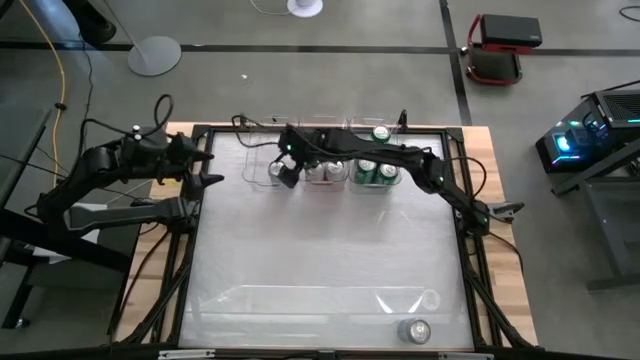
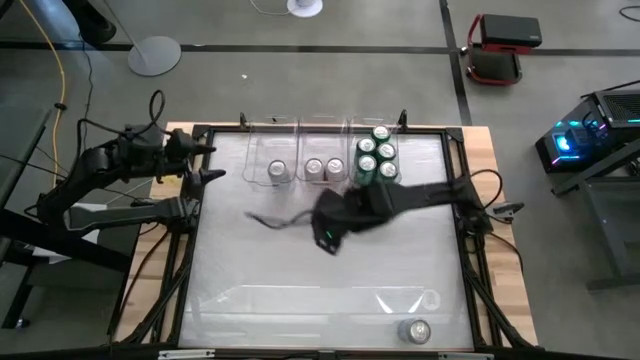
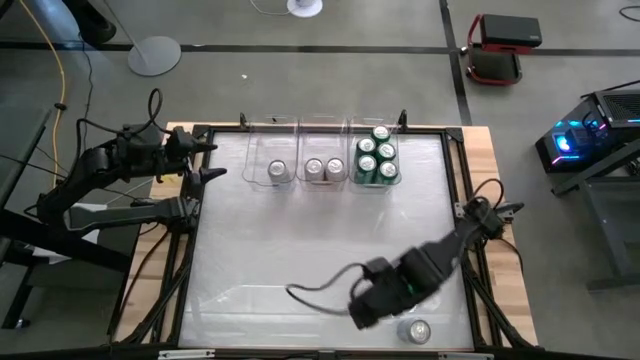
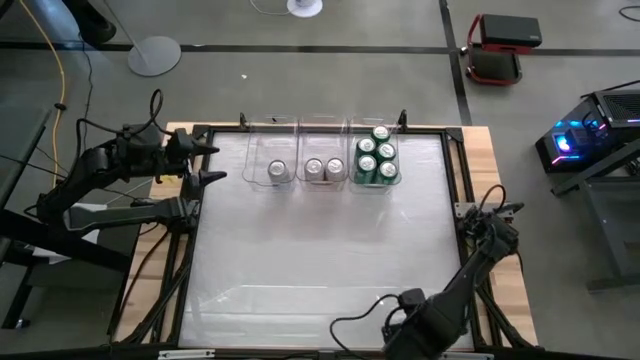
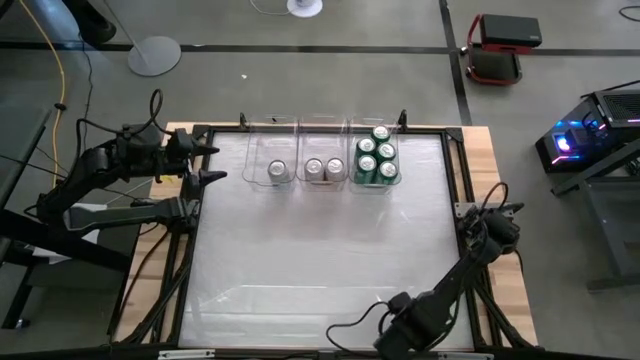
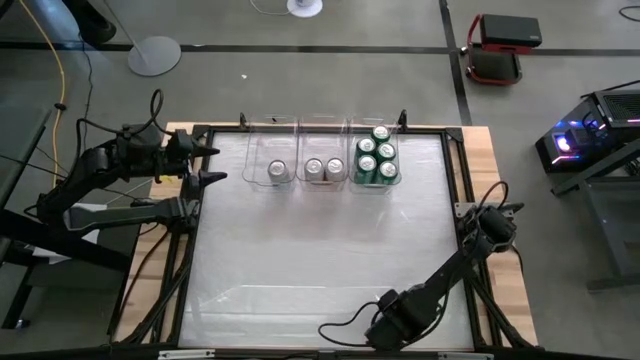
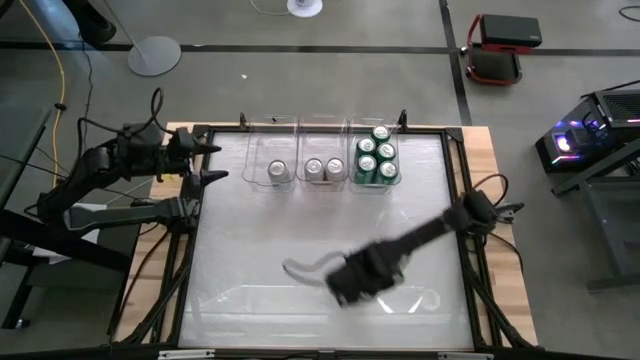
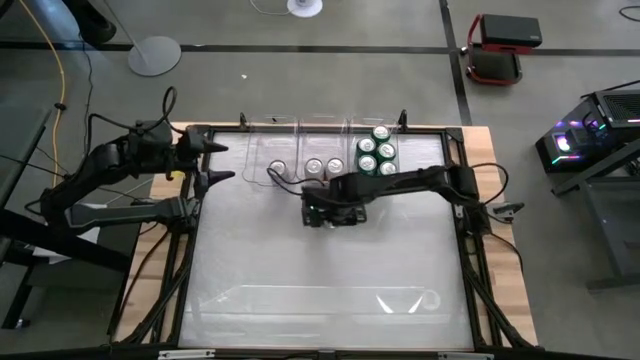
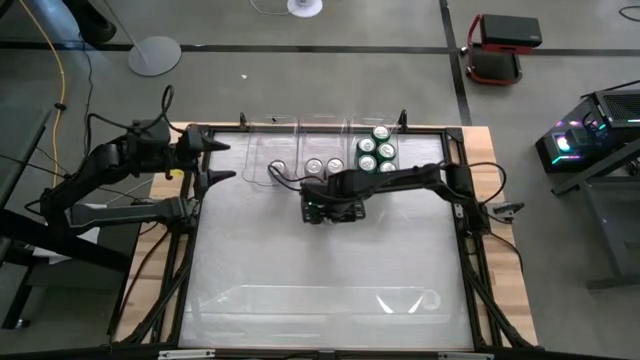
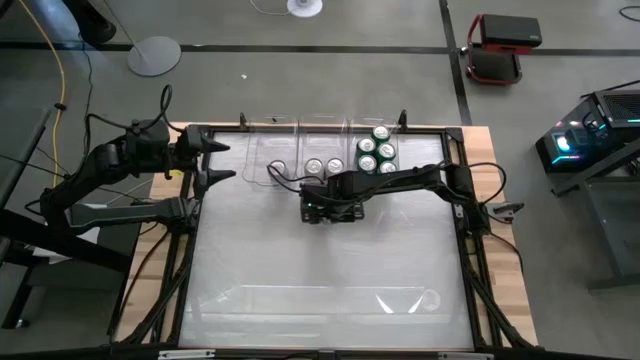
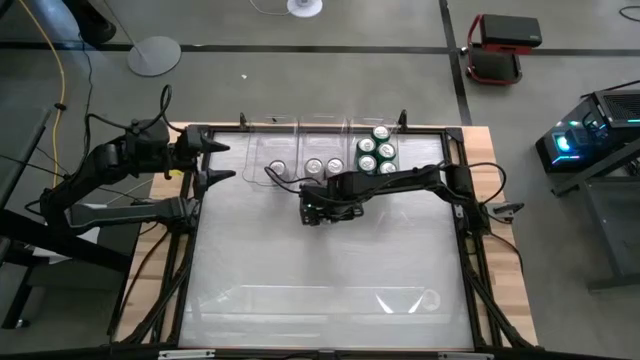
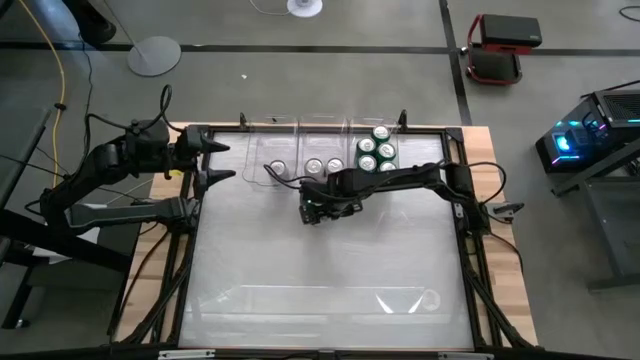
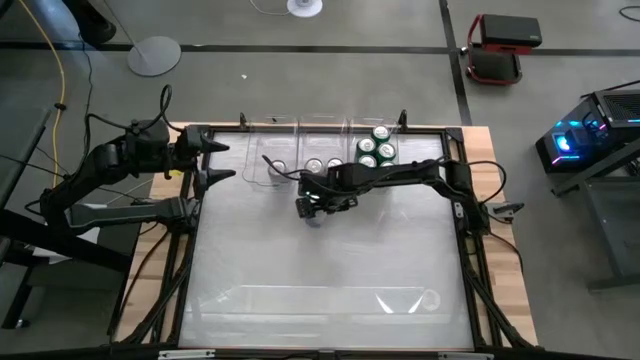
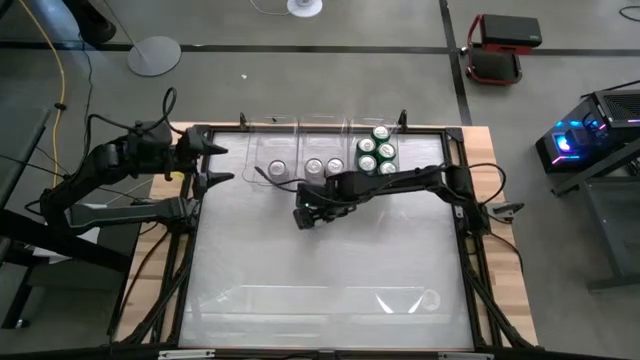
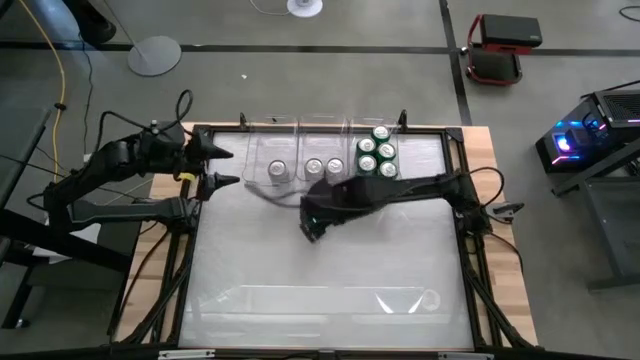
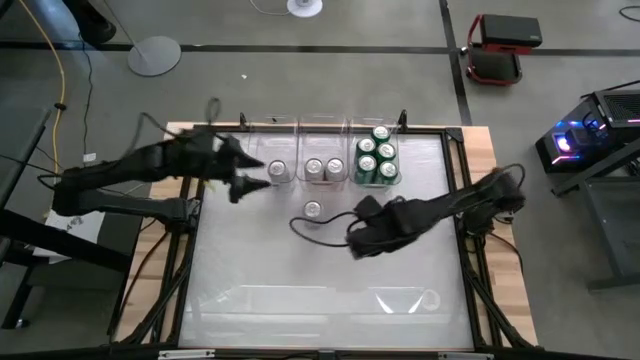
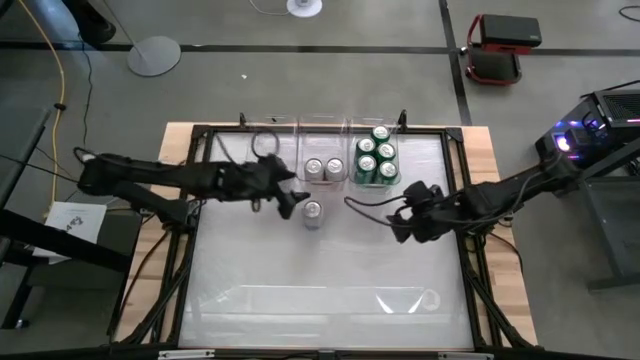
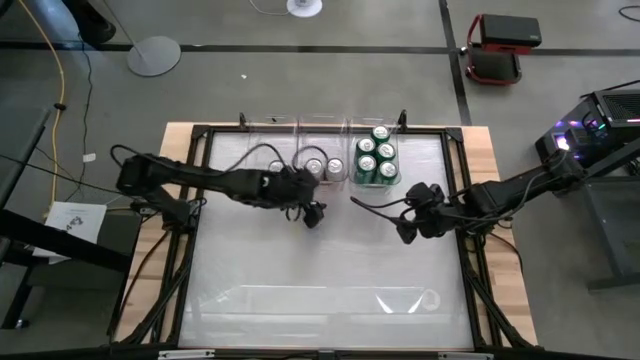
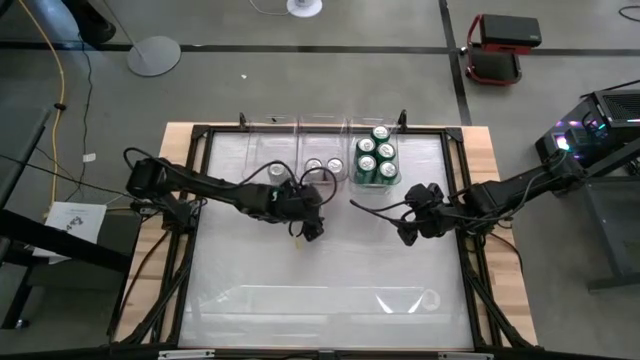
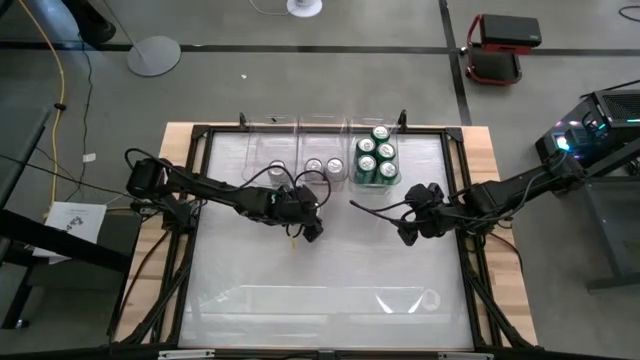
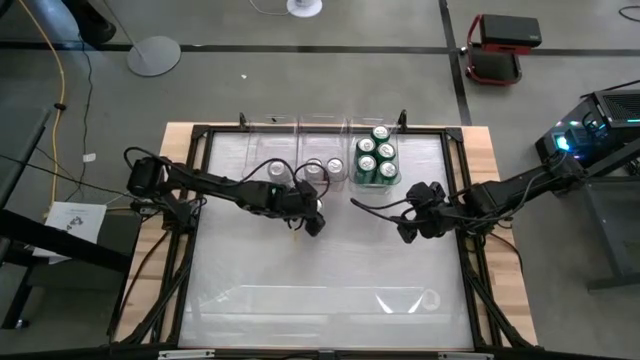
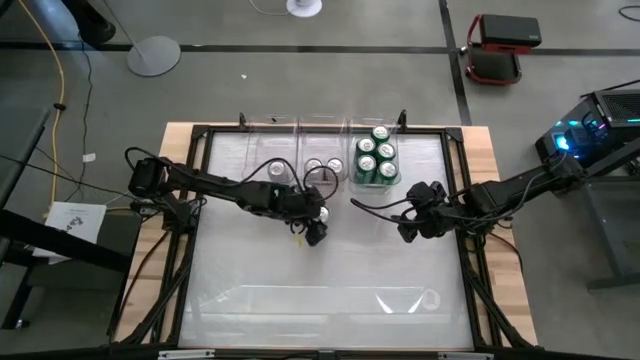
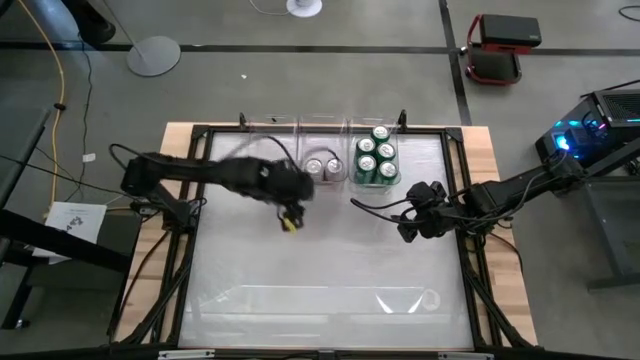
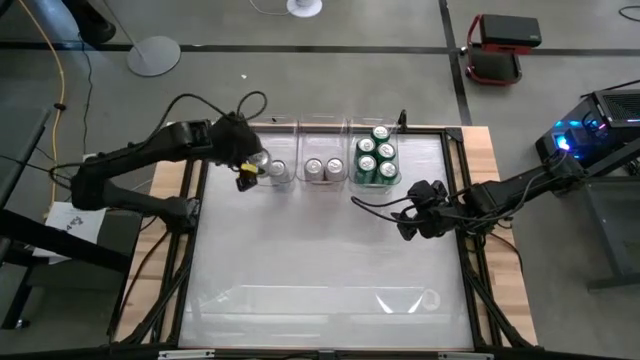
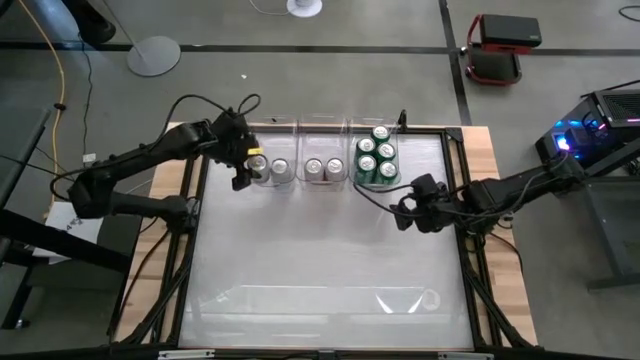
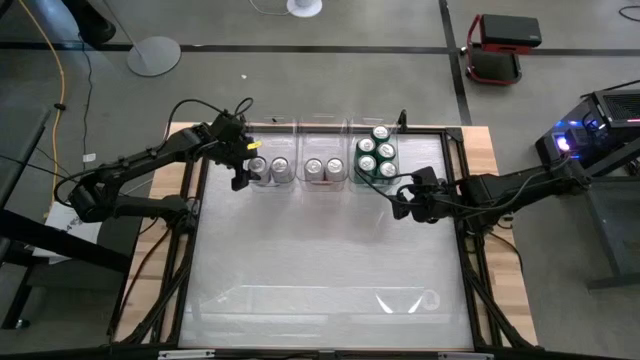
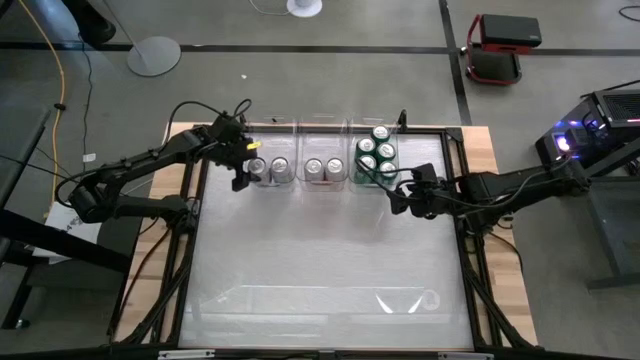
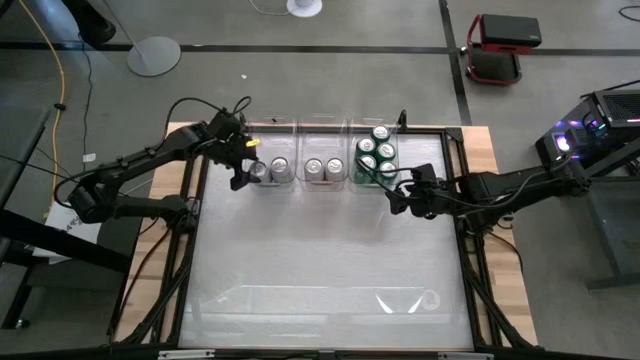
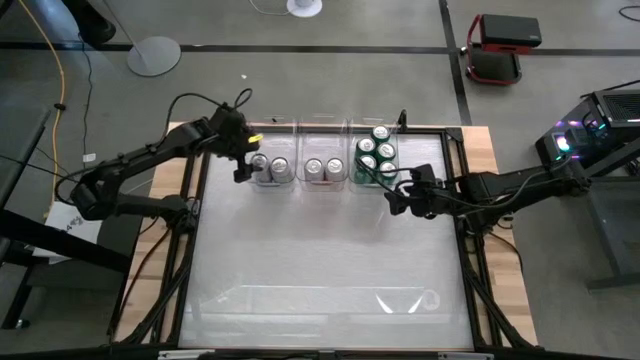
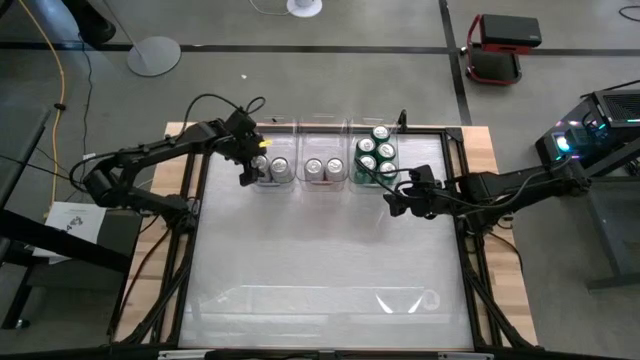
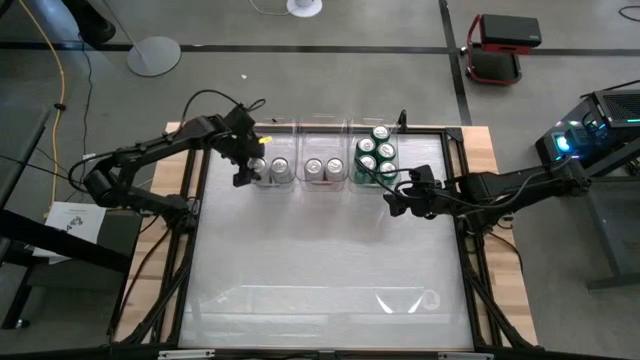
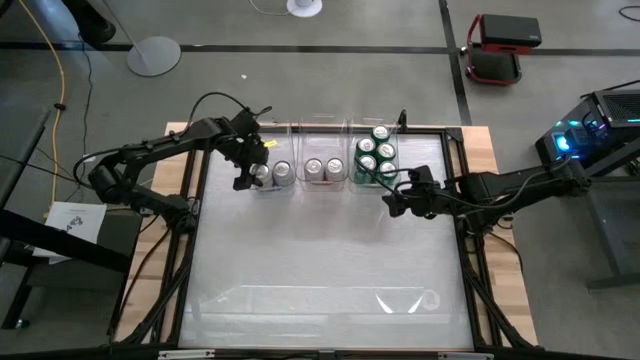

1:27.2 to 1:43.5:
Task: Sort soda cans
Put the blue-white soda can into the left transparent bin

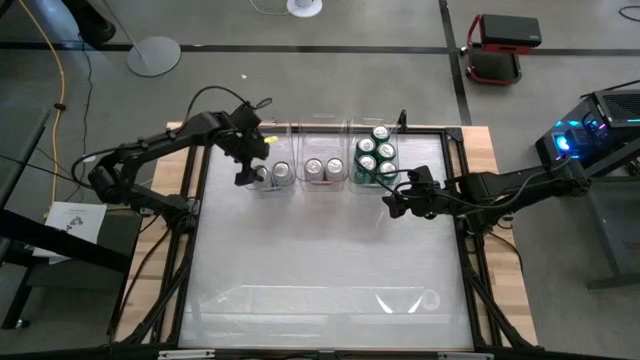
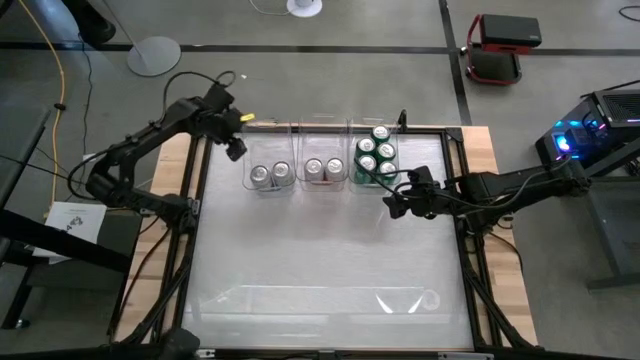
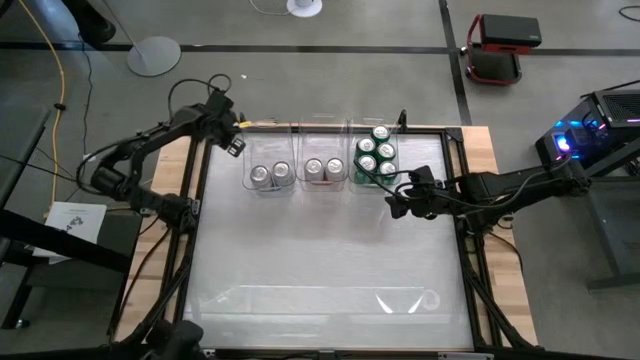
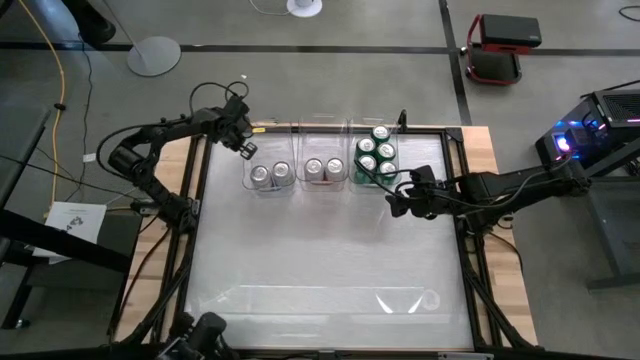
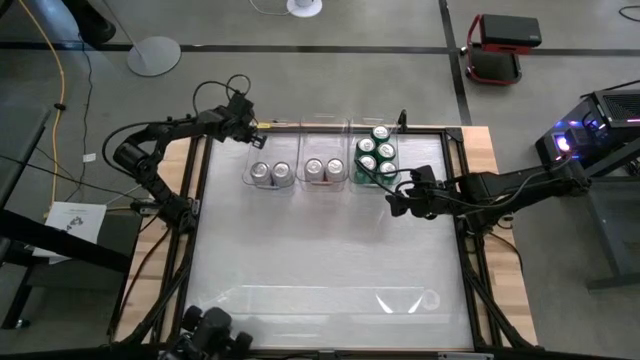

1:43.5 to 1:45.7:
Adjust the left transparent bin

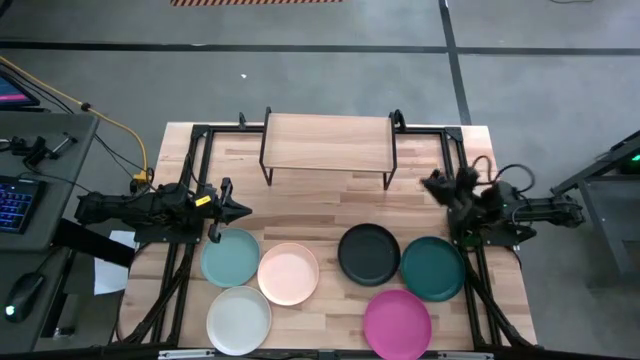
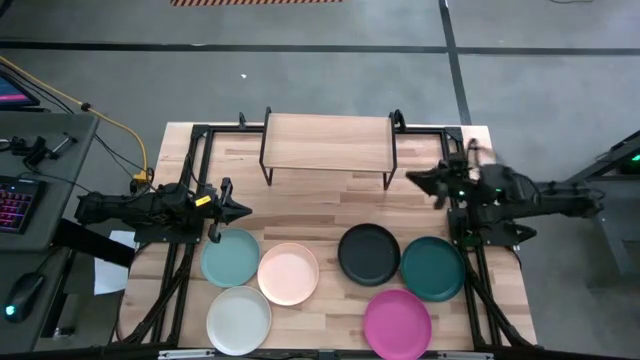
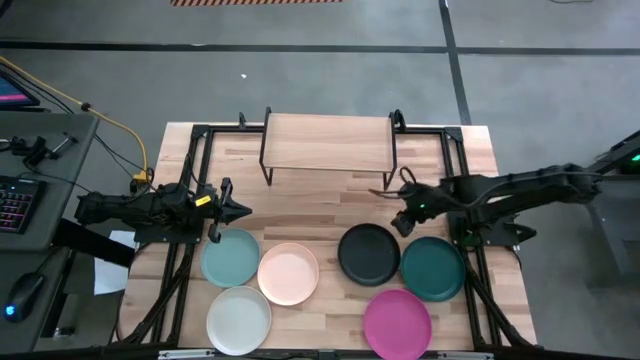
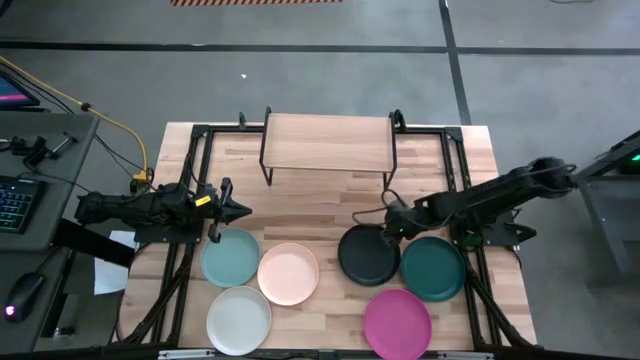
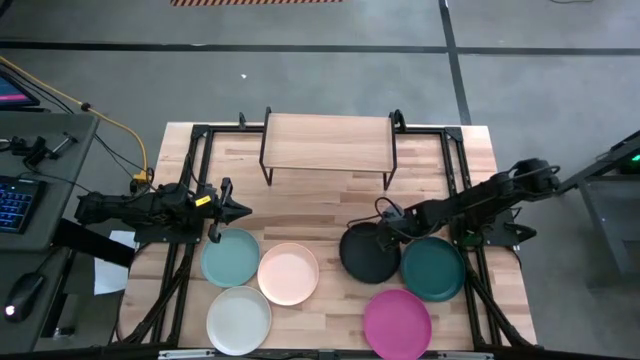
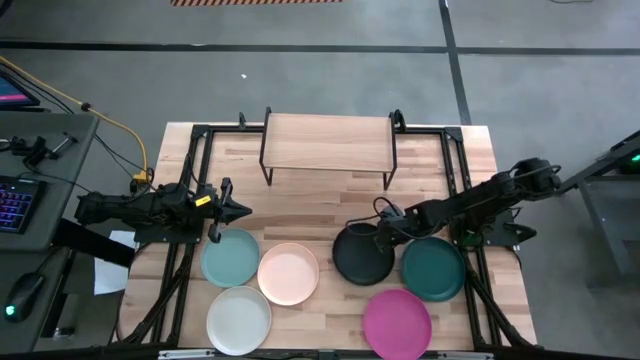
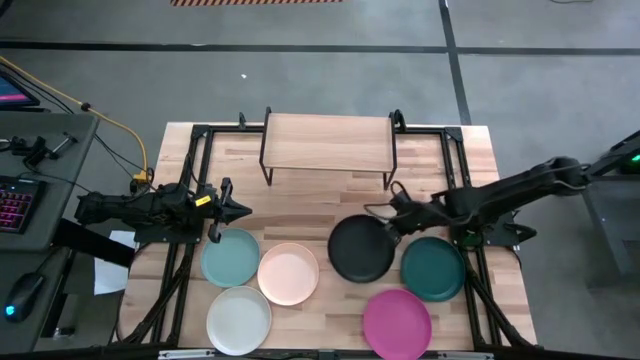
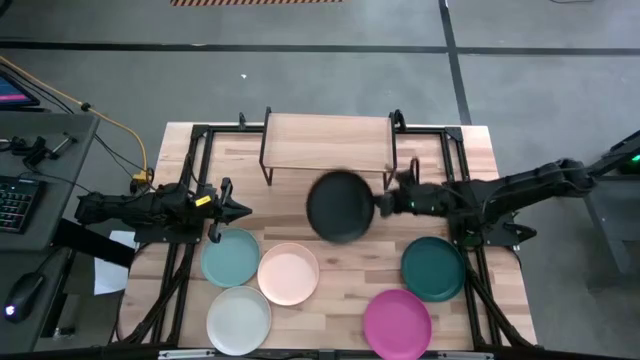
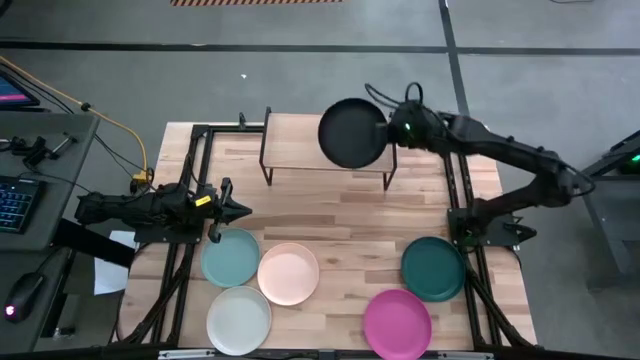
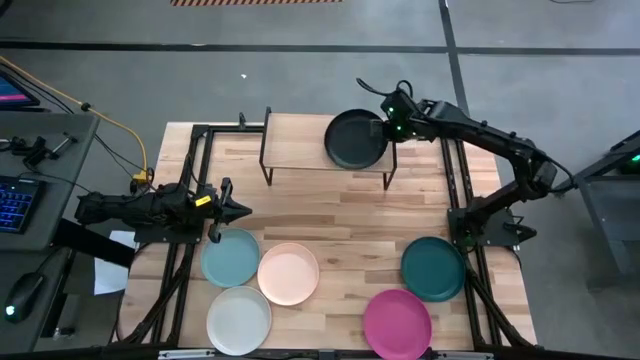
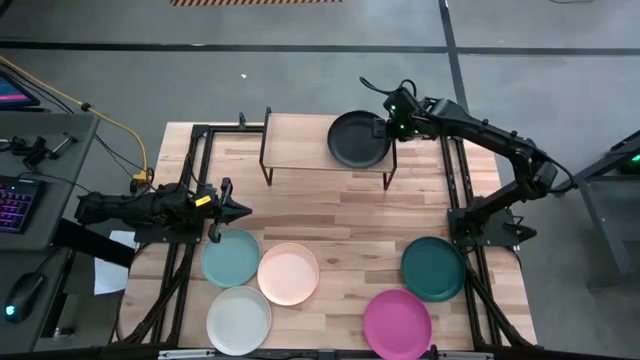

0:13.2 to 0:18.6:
Task: Place and stack plates onto a shelf
Put the black plate on the shelf
